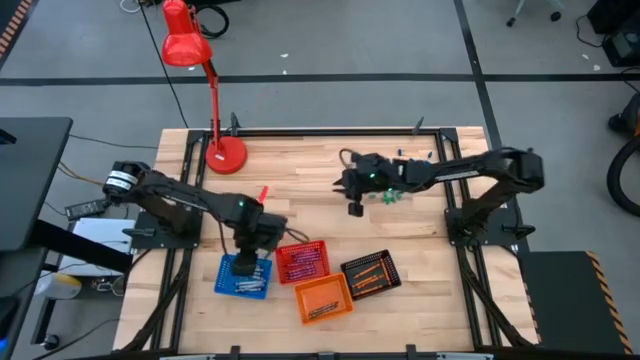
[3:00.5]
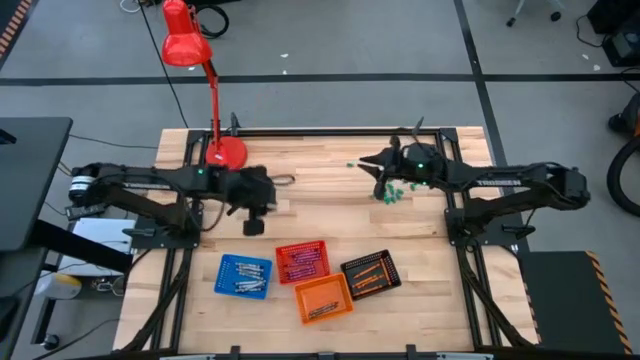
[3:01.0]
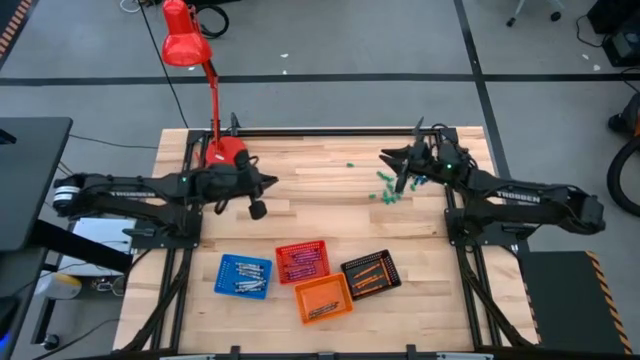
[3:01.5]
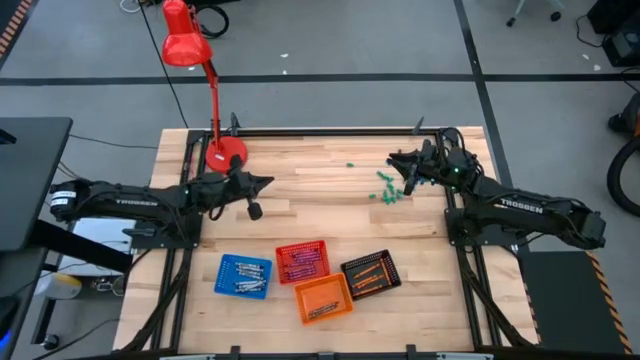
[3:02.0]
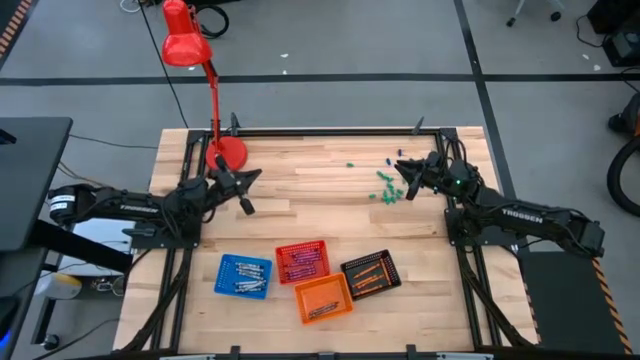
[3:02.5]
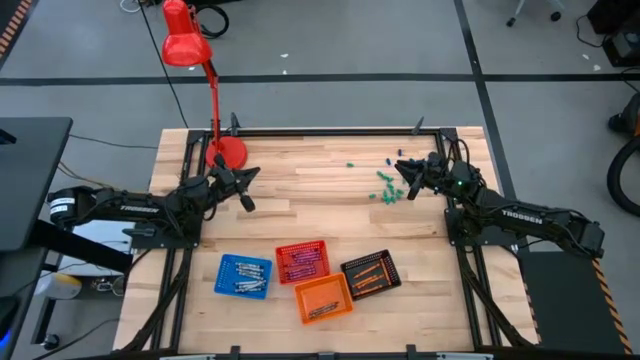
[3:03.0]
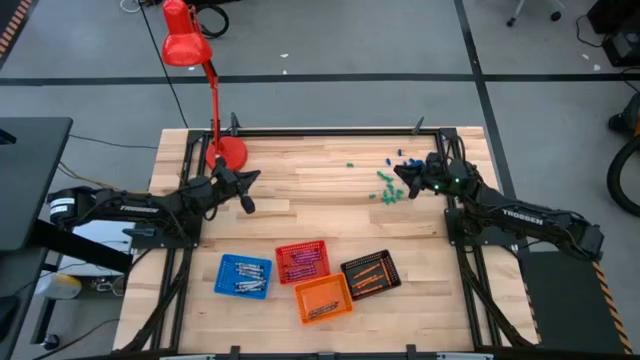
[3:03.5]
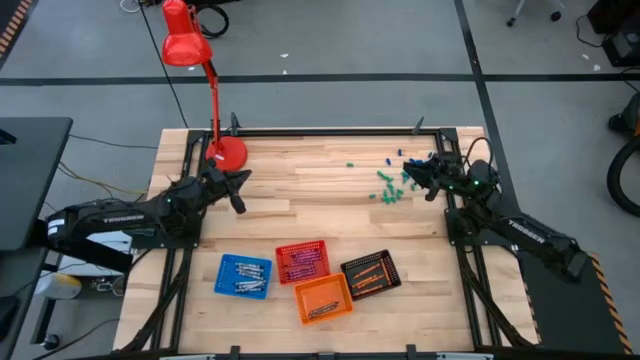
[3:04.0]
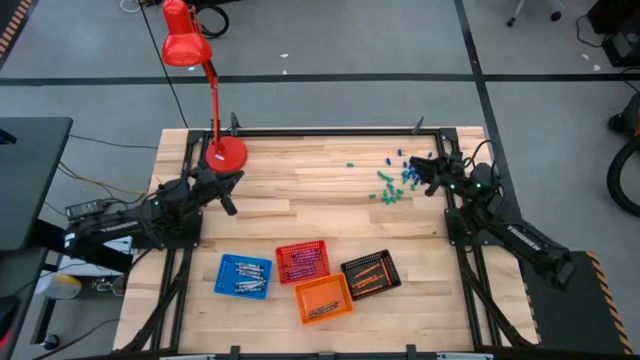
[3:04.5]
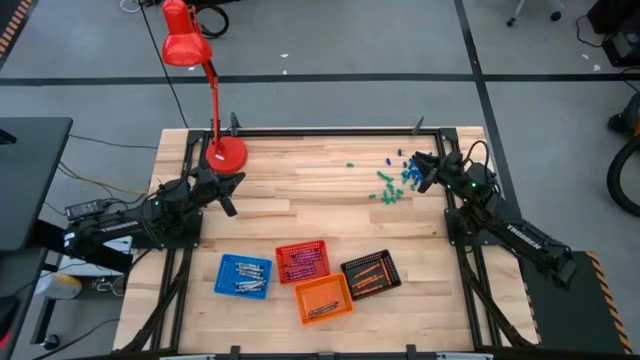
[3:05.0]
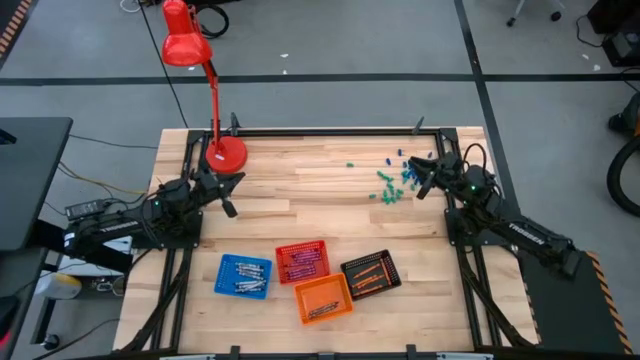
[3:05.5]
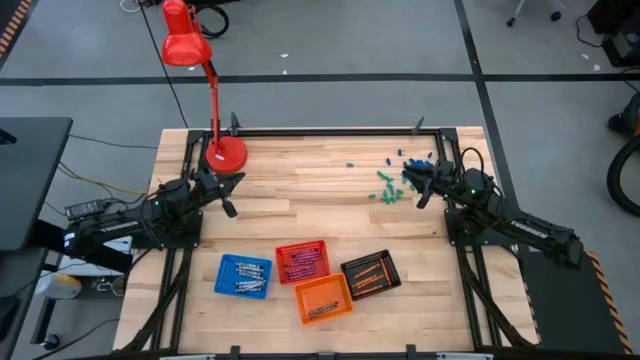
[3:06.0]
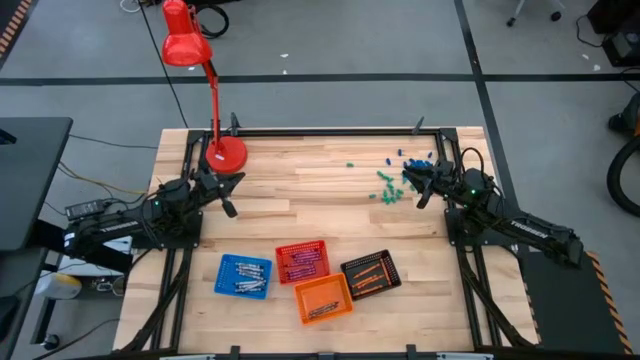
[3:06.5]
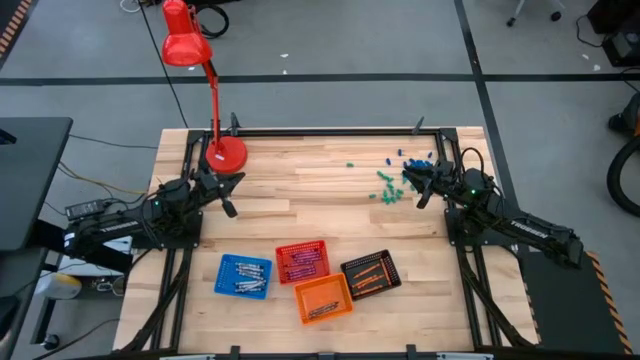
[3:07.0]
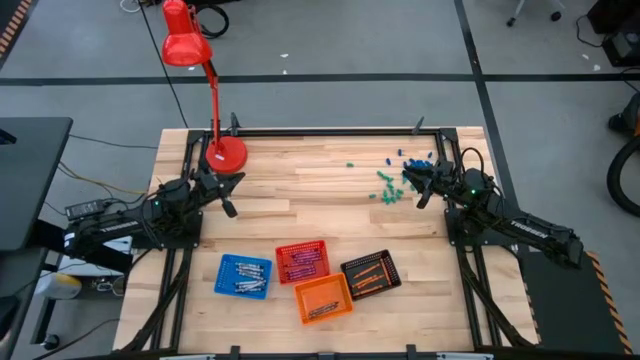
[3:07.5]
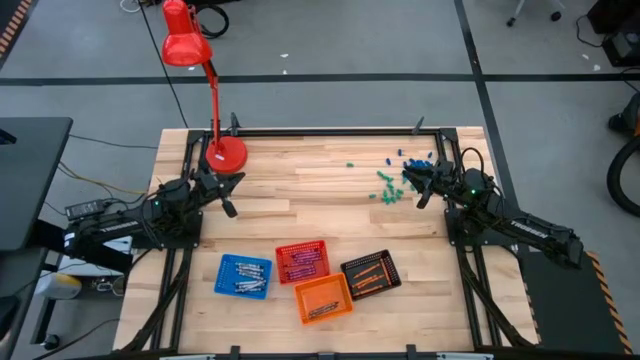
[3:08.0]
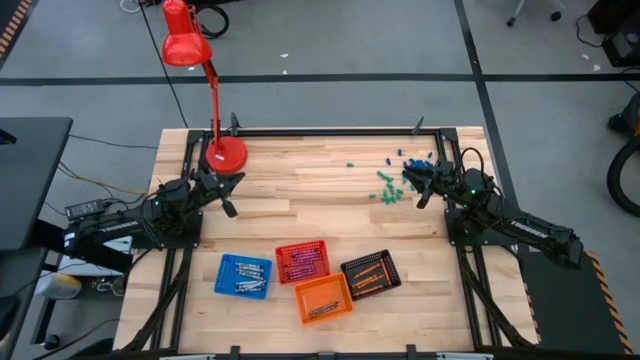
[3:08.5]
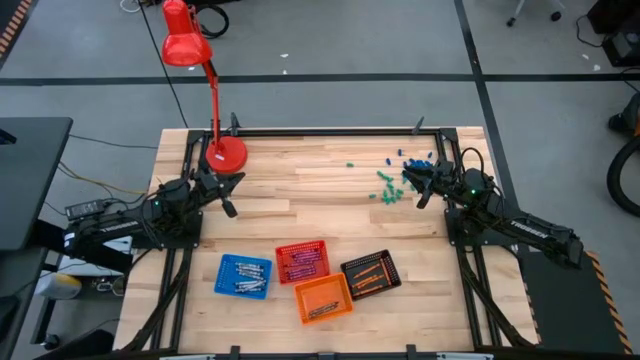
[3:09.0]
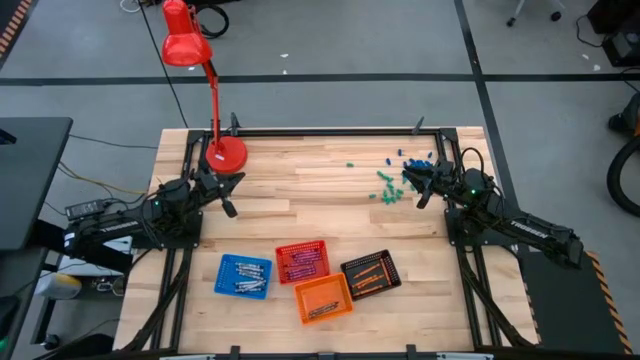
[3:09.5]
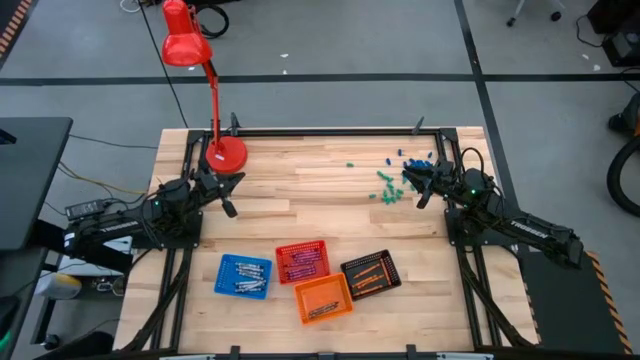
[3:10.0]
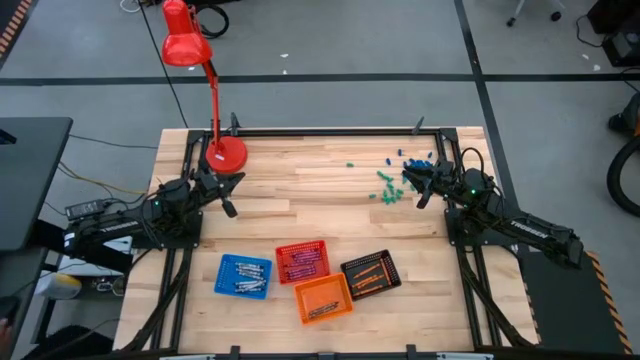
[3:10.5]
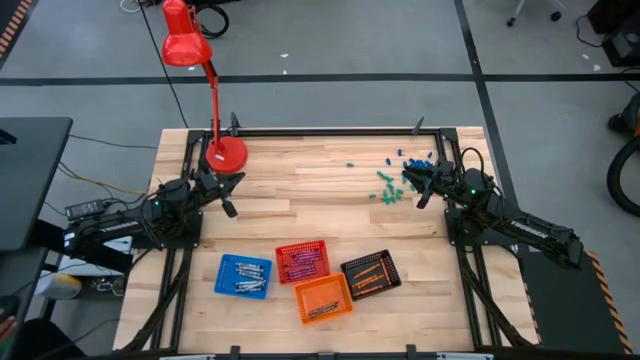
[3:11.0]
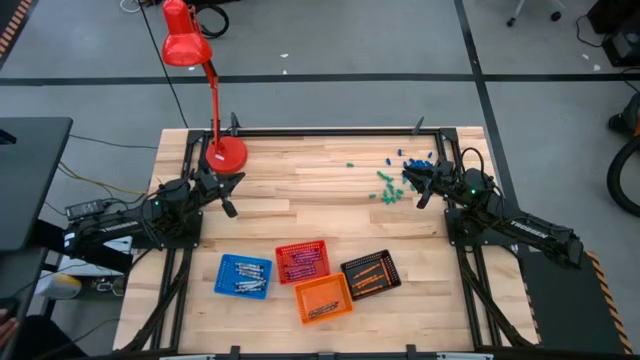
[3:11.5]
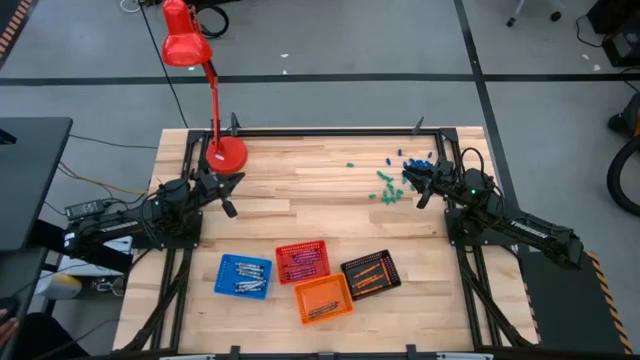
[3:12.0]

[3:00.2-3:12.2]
Task: Sort crayons
Return to Home Position

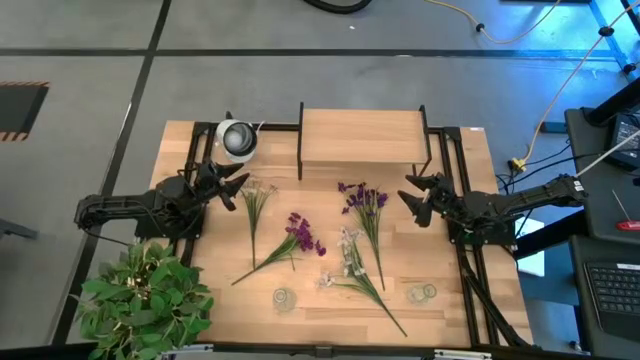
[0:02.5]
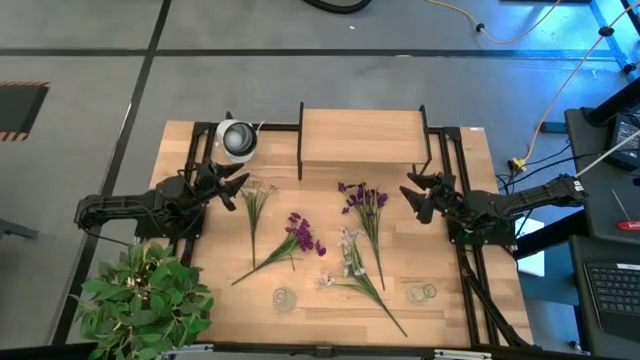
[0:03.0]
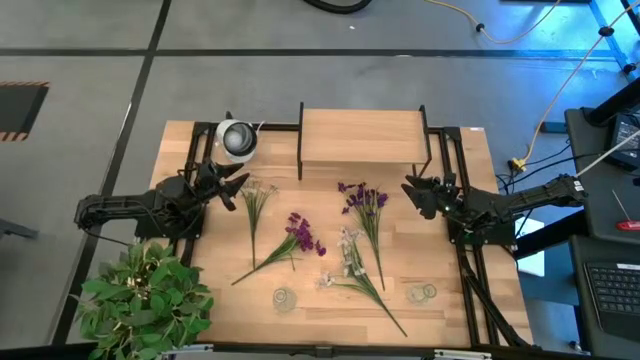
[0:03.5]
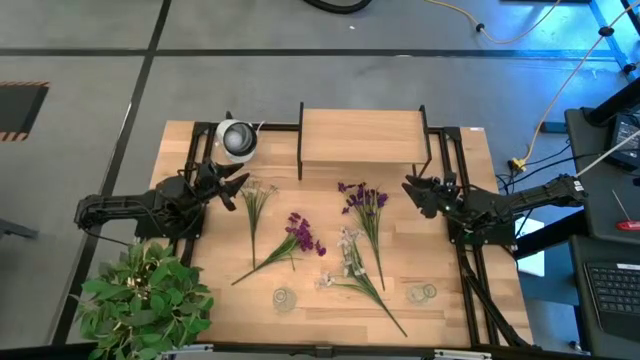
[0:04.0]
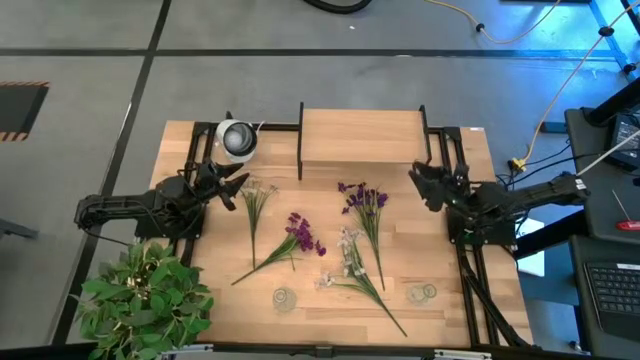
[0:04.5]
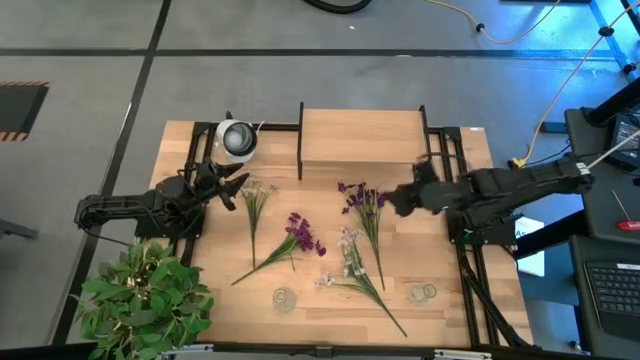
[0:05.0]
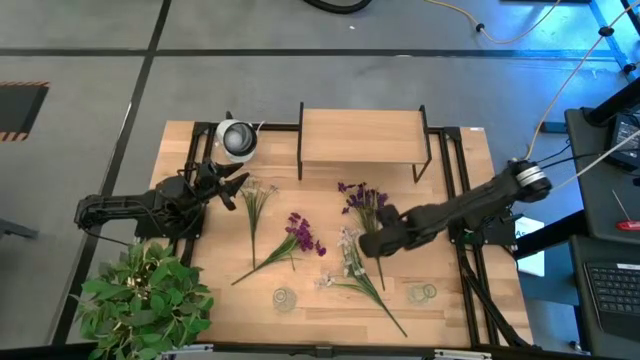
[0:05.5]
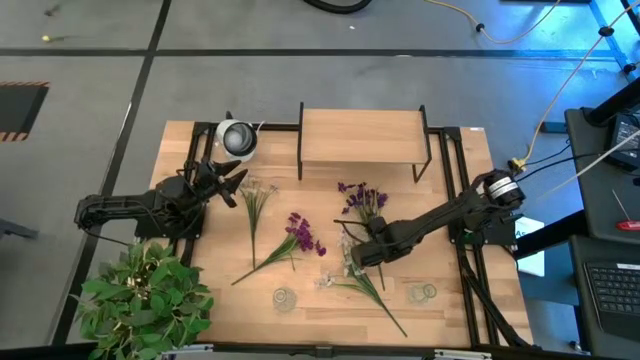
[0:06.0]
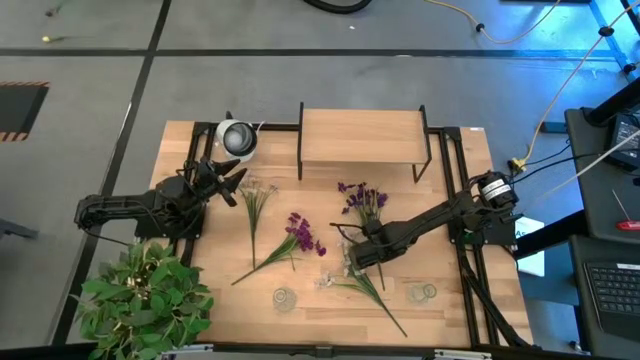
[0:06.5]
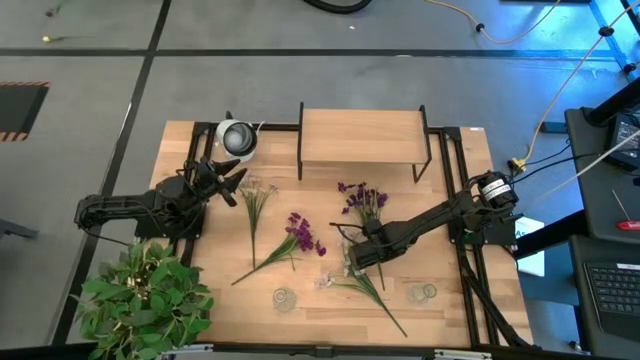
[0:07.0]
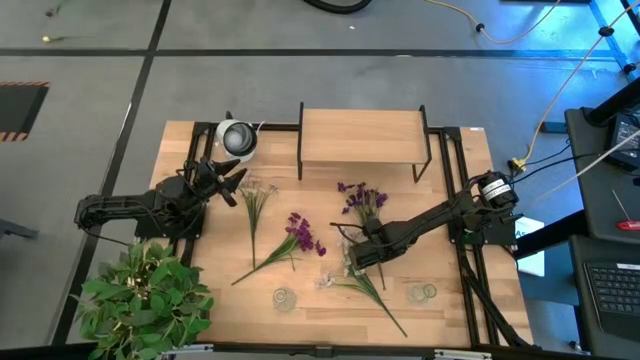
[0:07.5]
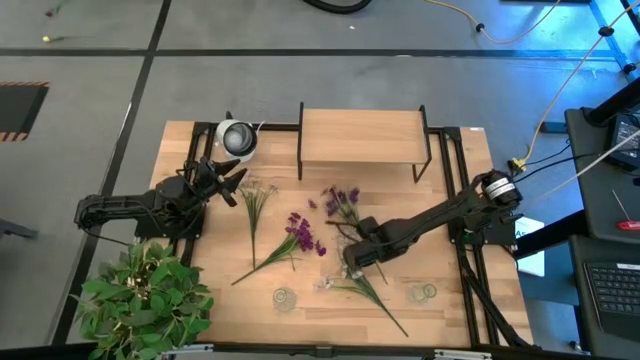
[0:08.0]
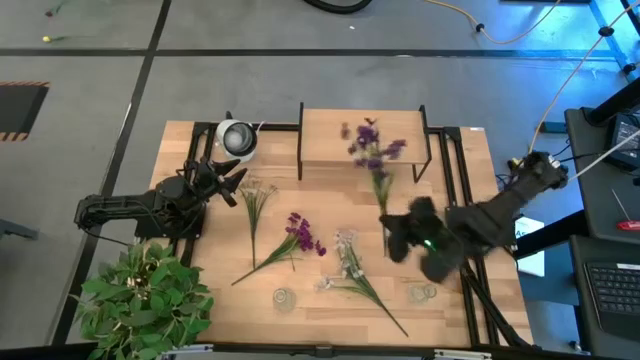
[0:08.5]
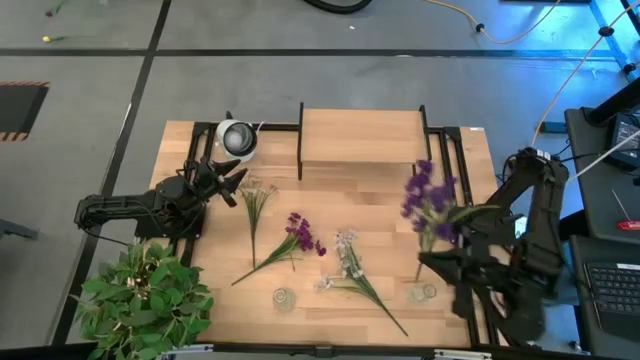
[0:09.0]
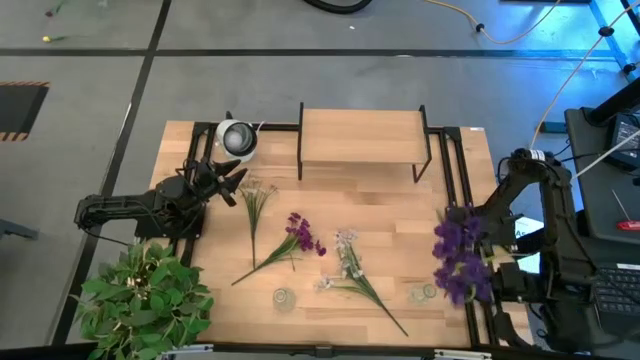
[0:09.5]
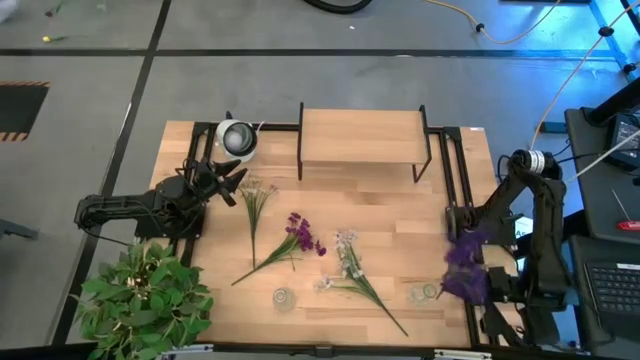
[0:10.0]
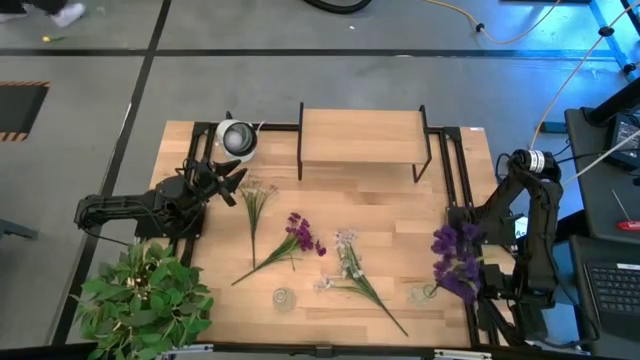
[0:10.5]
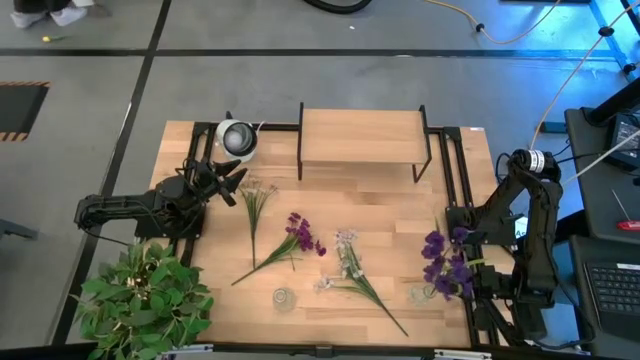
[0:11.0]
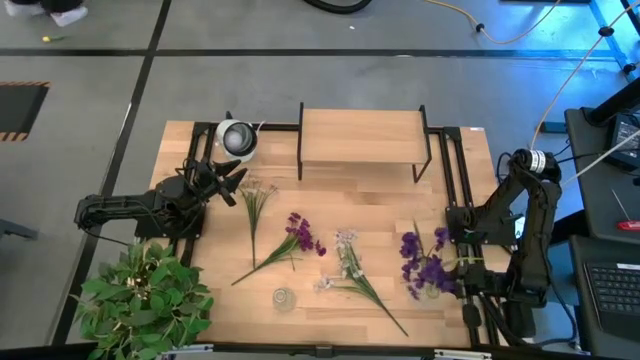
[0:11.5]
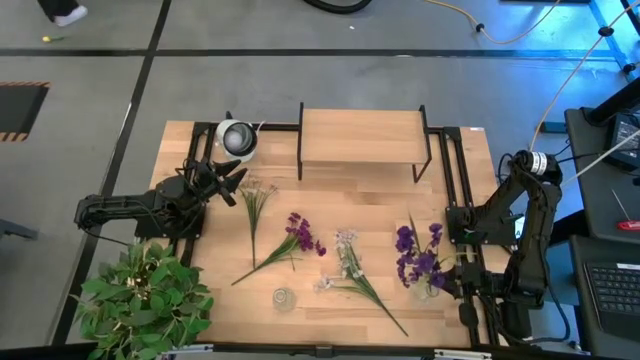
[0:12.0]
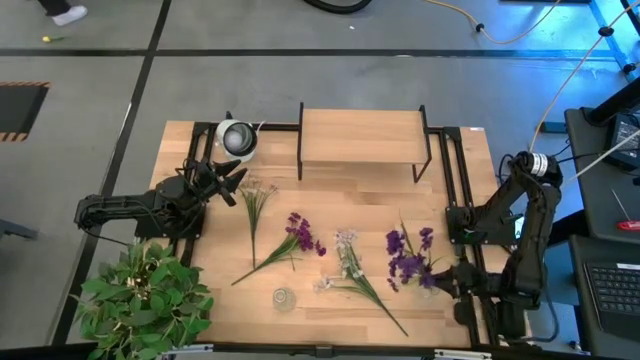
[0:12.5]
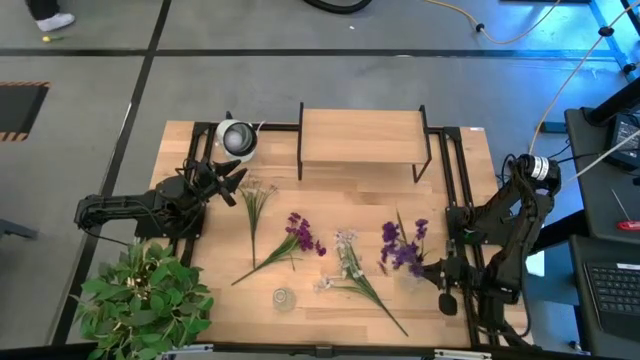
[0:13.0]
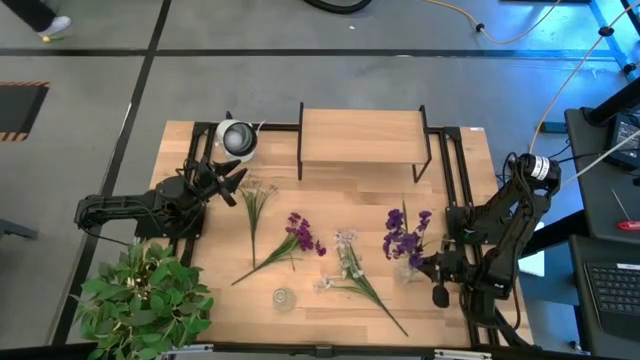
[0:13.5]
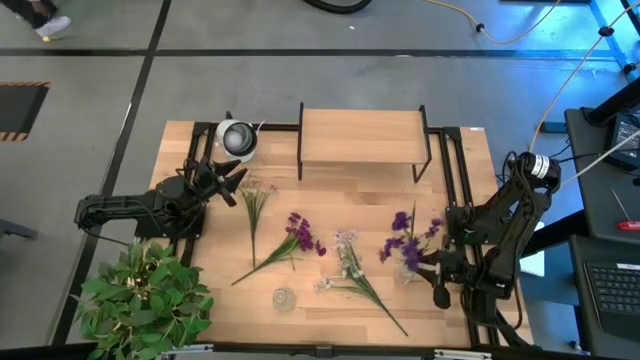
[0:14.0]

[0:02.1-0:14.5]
Task: Pick and place flowers into a vace then onto a shelf
Put the left purple flowers into the right transparent vase
